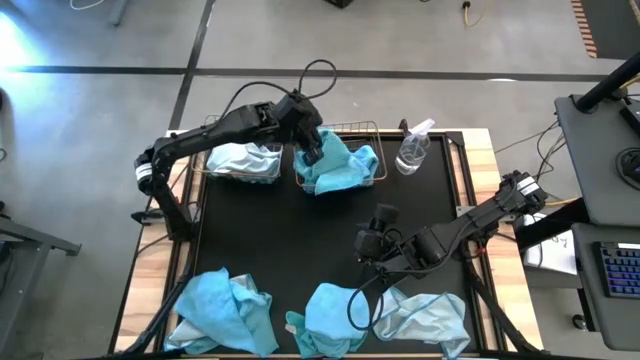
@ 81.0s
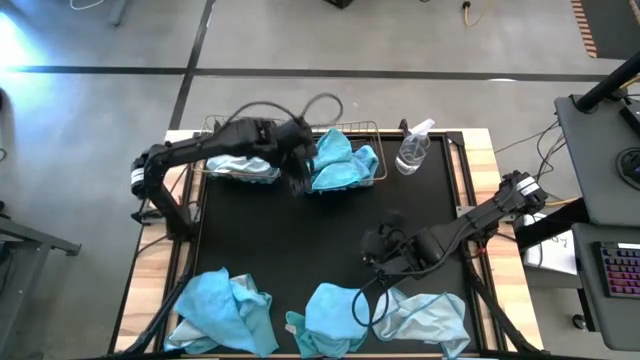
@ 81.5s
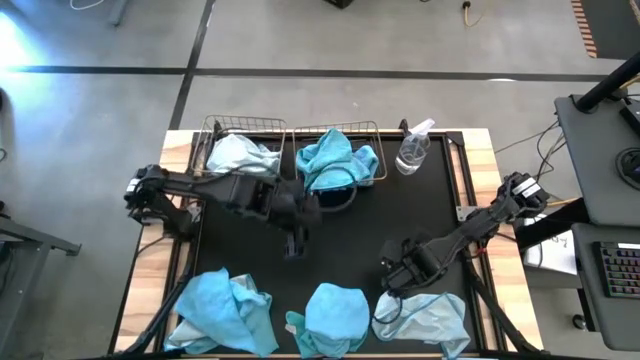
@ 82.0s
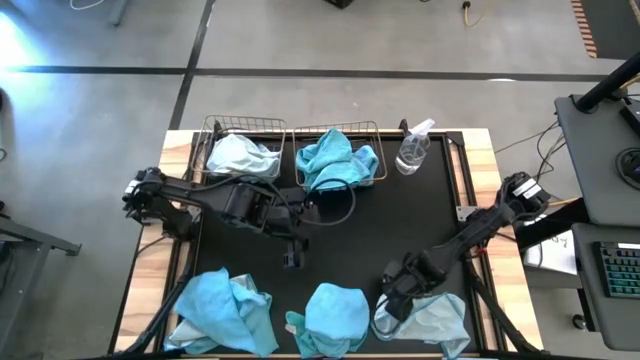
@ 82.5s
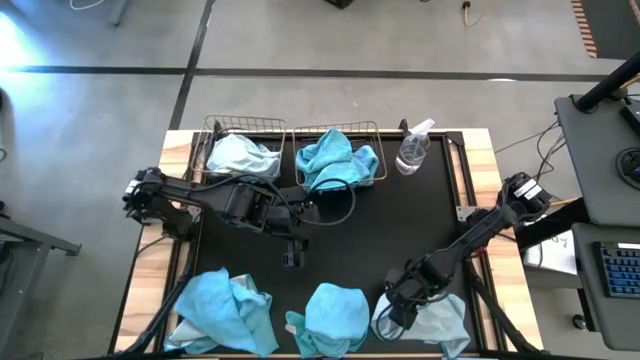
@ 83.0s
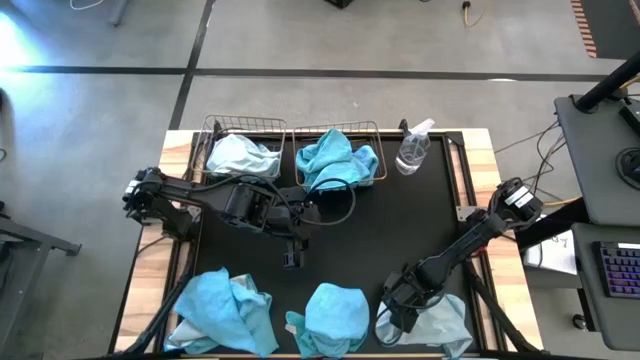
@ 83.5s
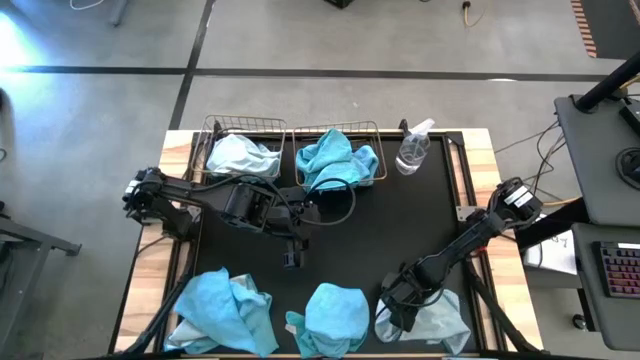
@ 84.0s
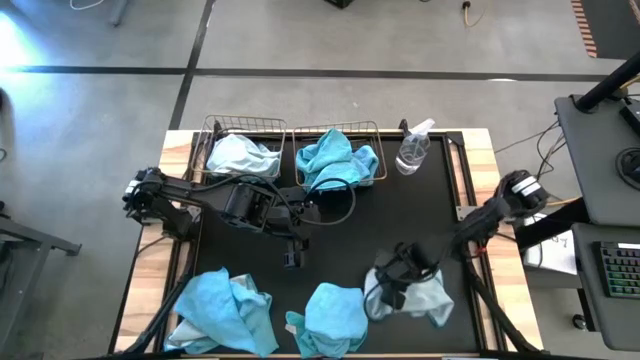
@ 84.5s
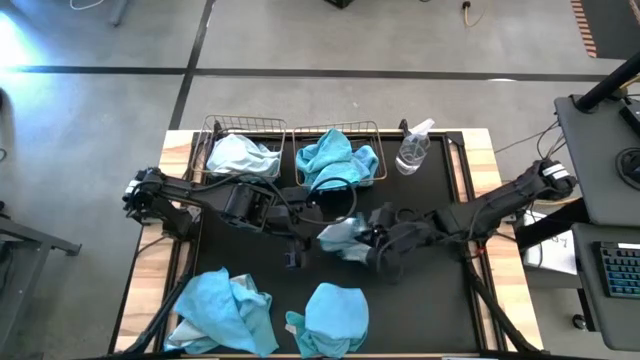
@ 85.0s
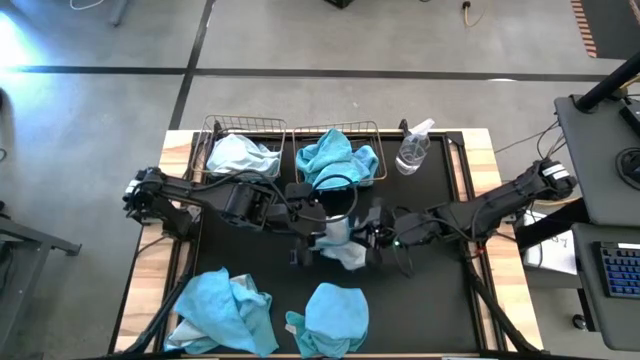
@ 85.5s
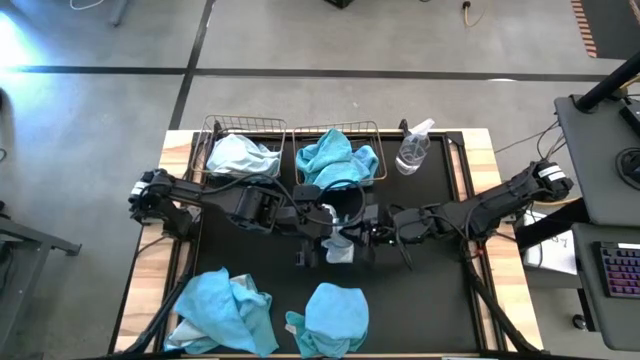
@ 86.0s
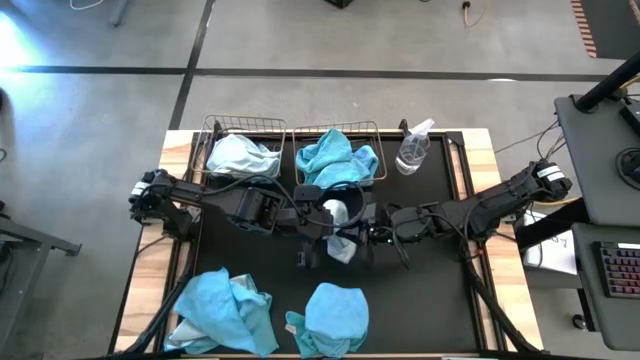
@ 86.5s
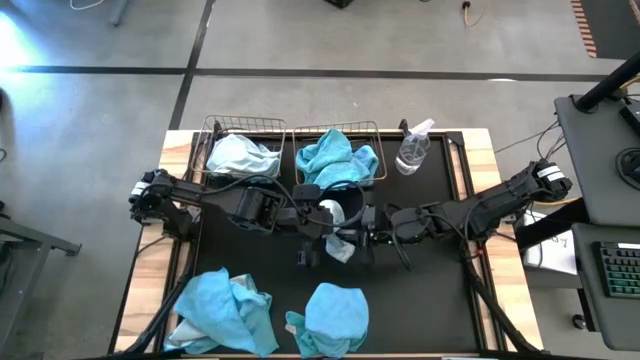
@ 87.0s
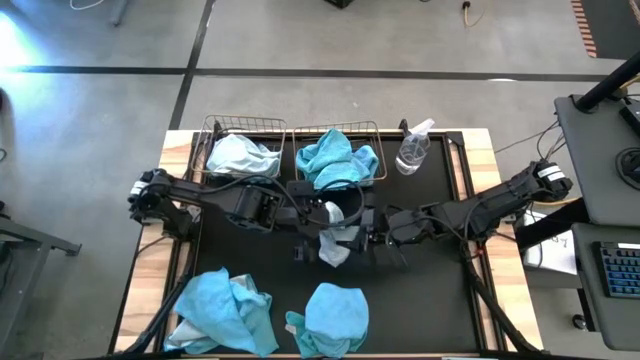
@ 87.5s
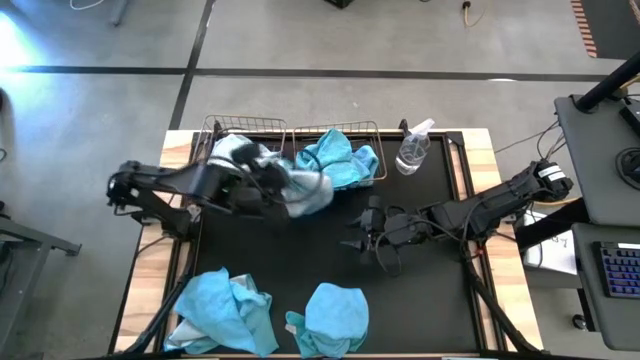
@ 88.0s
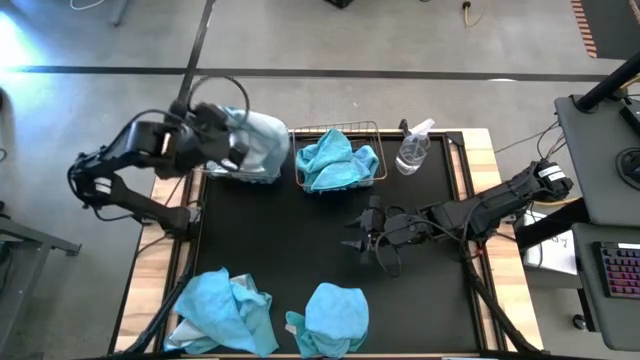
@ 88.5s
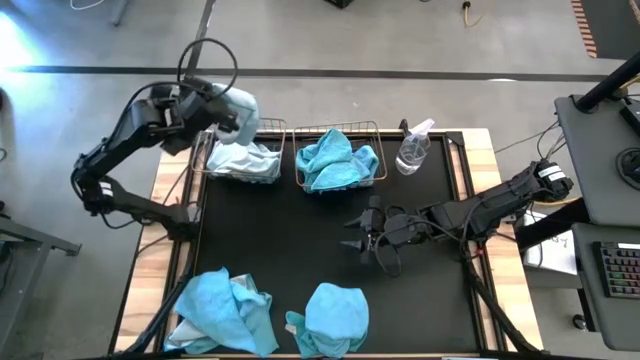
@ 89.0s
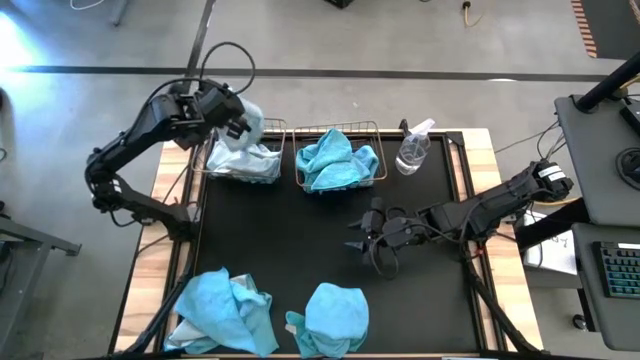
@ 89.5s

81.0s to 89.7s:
Task: Sort microfiber towel by color & place in baskets
Put the light-blue microfiber towel into the left wire basket

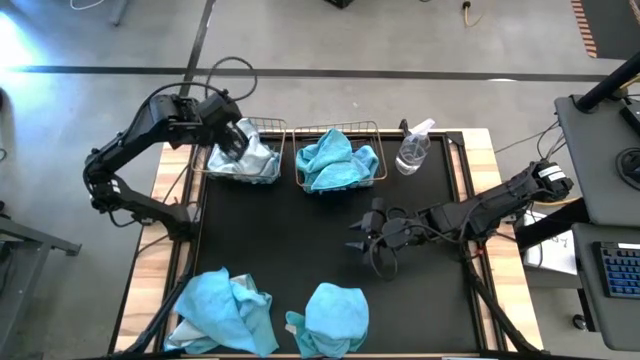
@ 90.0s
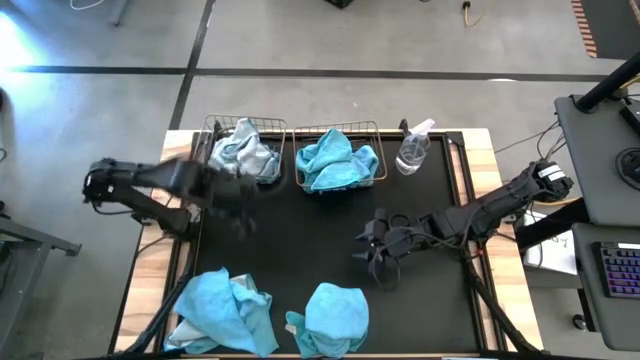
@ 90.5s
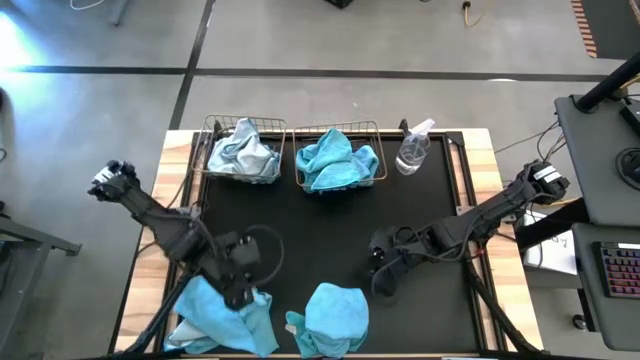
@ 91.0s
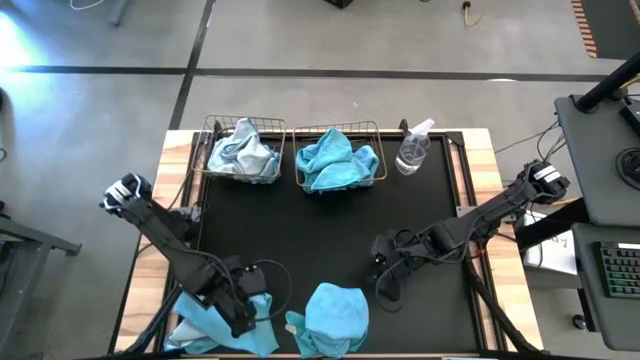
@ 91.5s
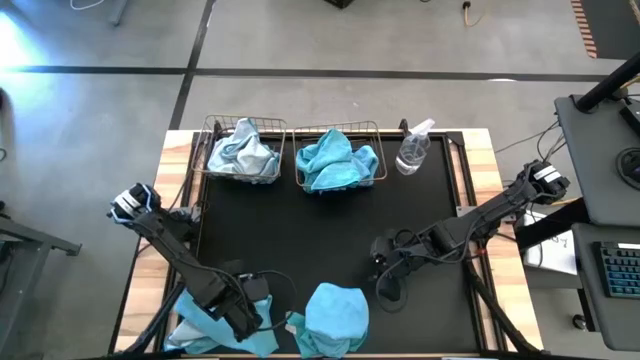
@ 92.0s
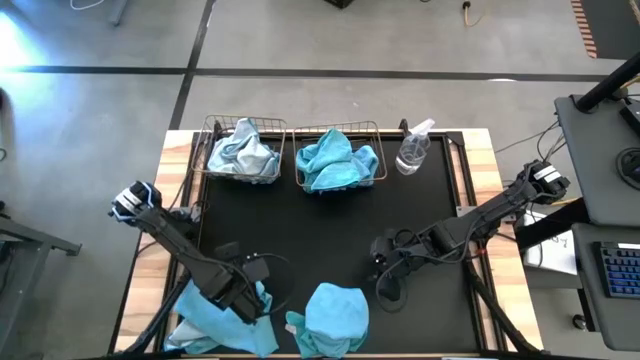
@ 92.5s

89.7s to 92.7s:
Put the blue microfiber towel into the right wire basket

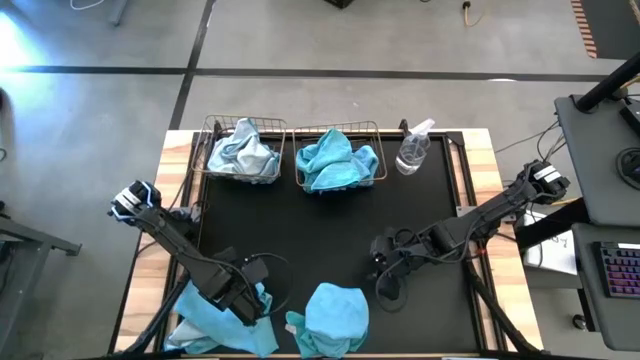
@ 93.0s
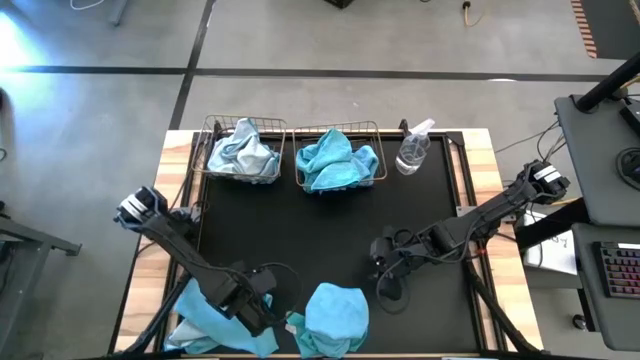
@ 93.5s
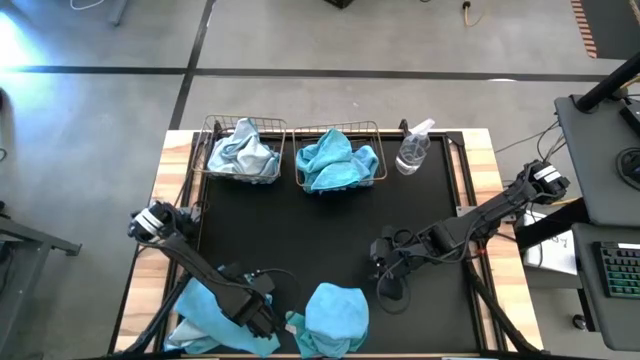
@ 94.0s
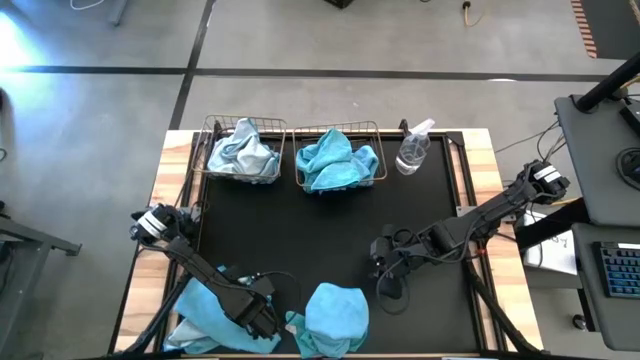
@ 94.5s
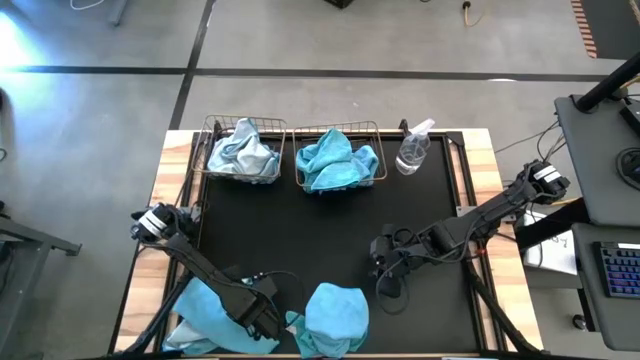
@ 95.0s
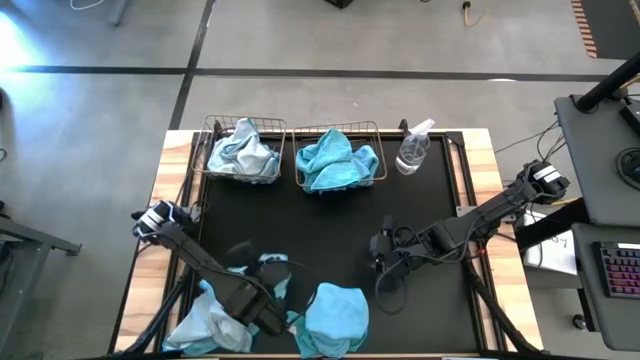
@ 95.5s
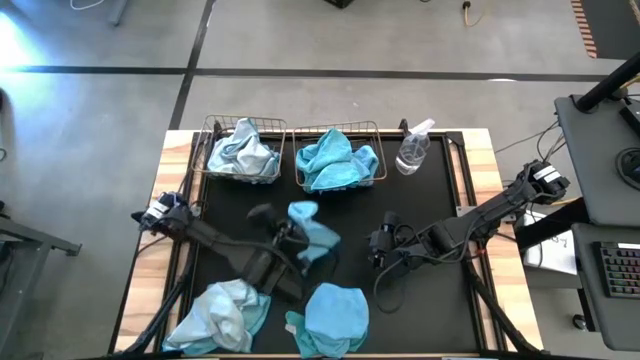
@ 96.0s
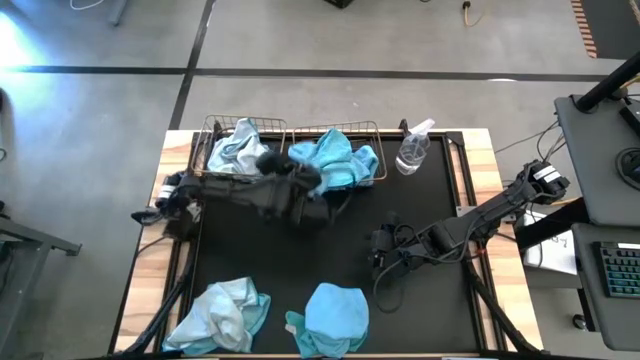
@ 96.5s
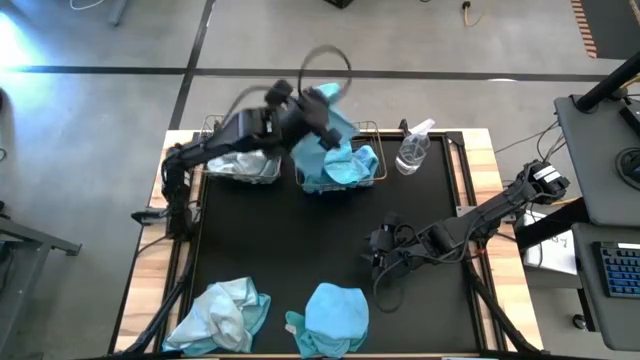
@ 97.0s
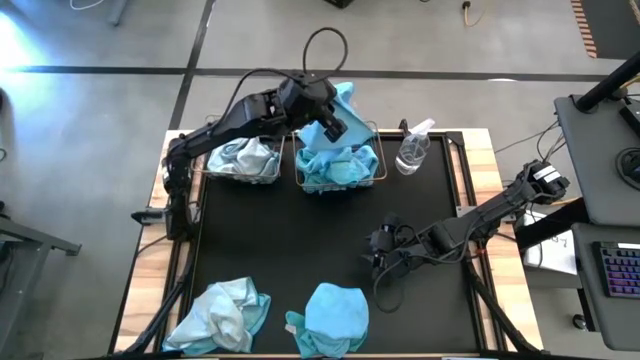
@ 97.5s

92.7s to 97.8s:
Put the blue microfiber towel into the right wire basket

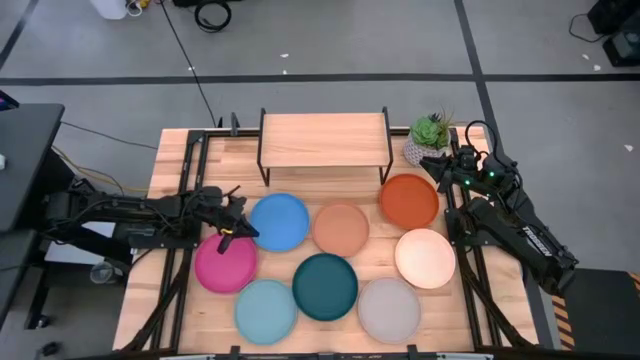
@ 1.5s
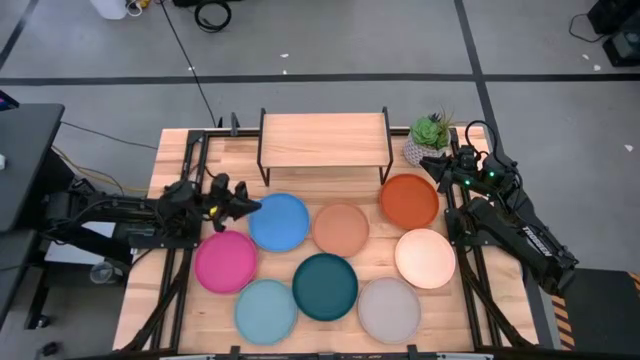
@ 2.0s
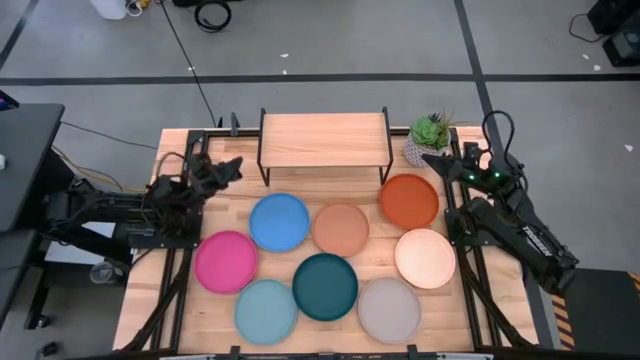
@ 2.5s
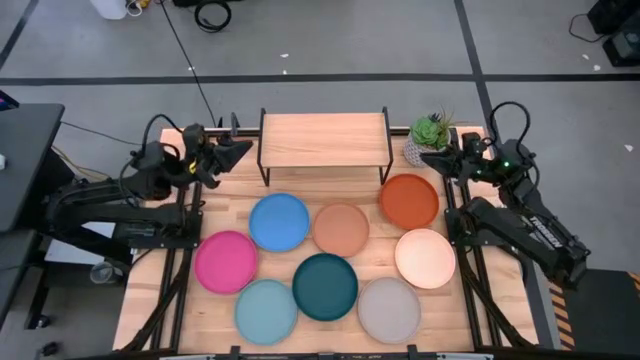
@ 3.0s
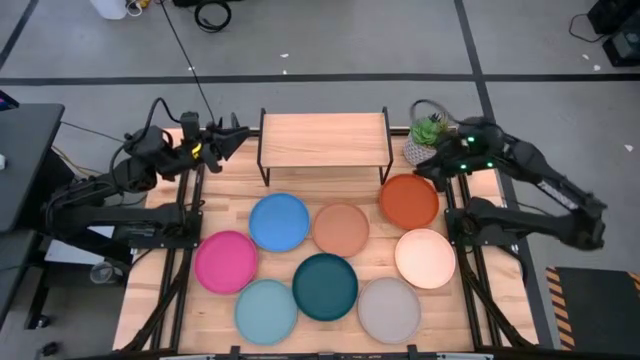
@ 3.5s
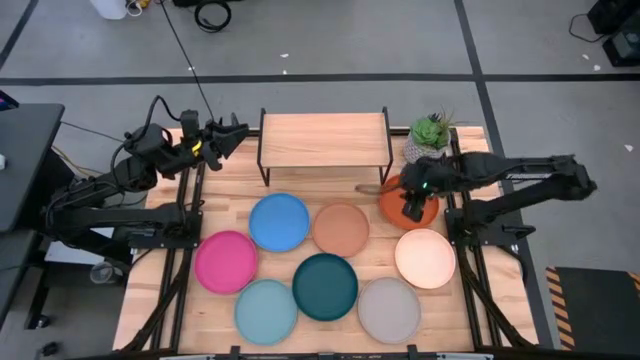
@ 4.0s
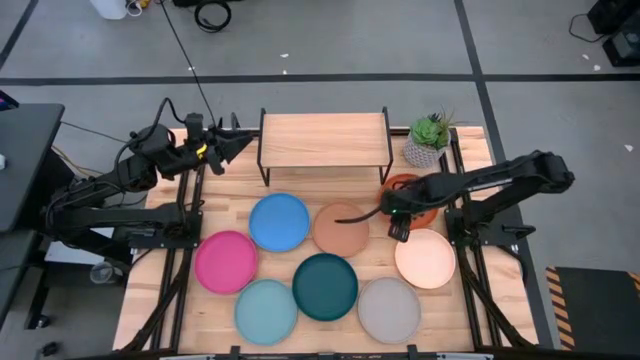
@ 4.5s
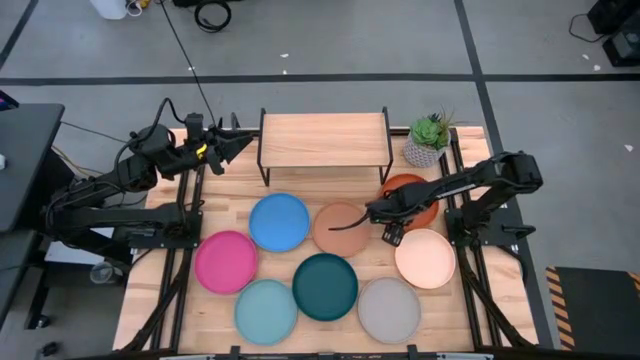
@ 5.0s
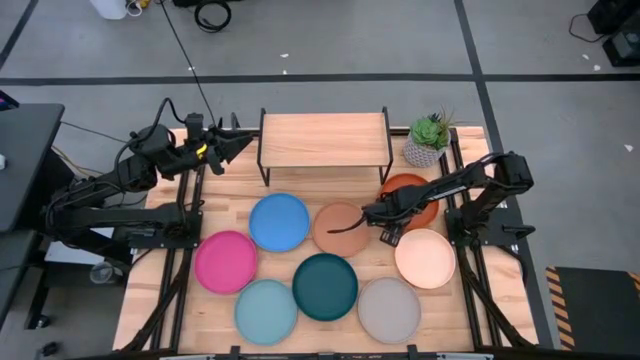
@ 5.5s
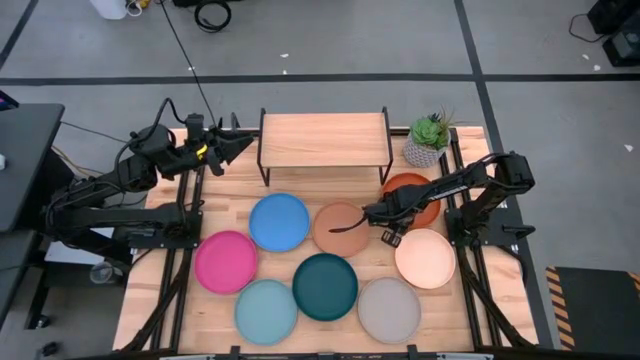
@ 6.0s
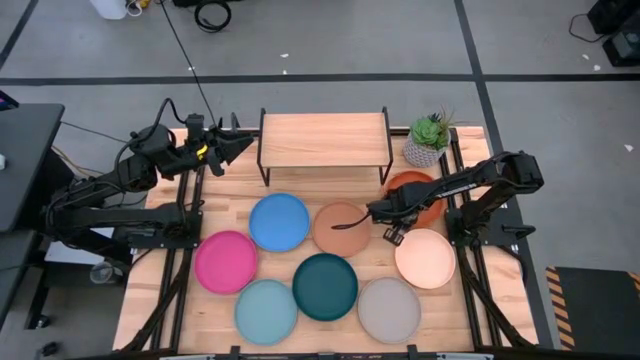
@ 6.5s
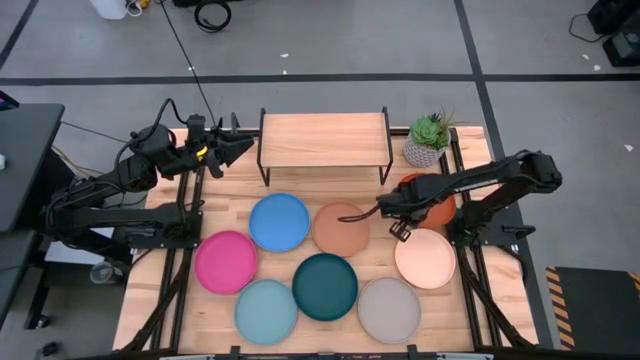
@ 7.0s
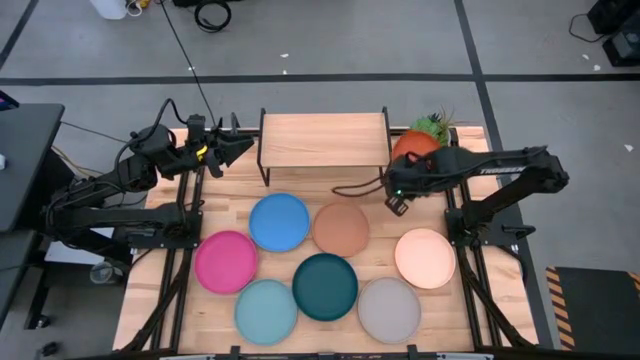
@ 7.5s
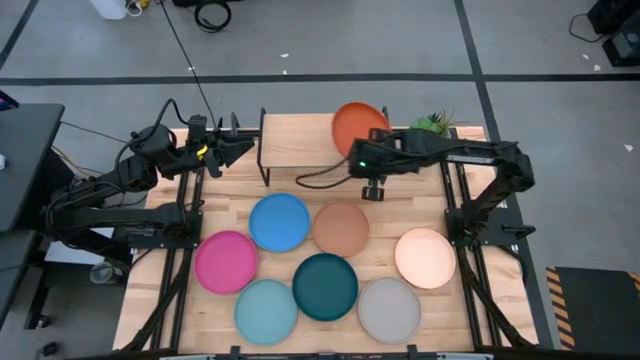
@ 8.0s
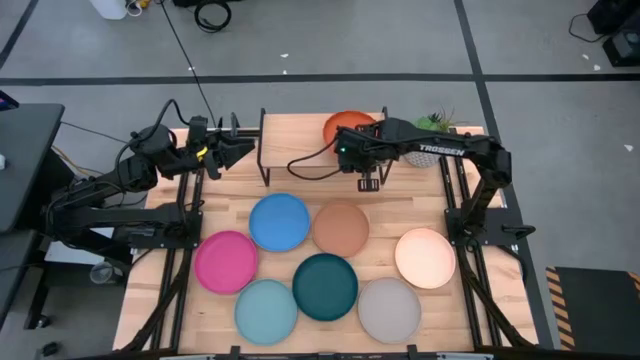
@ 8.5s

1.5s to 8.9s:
Task: Place and stack plates onto a shelf
Put the orange plate on the shelf
